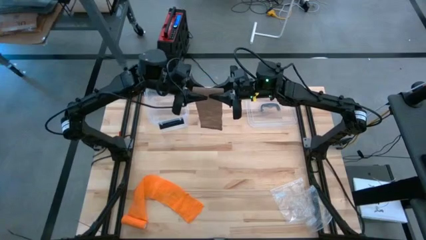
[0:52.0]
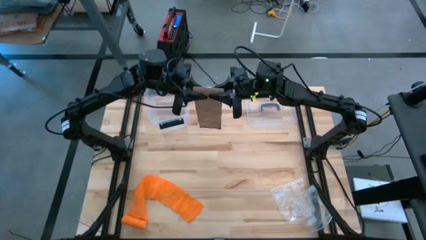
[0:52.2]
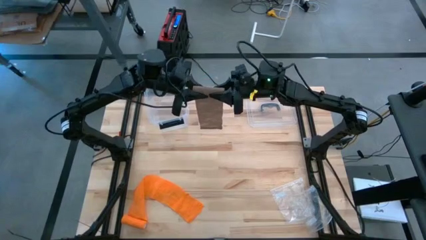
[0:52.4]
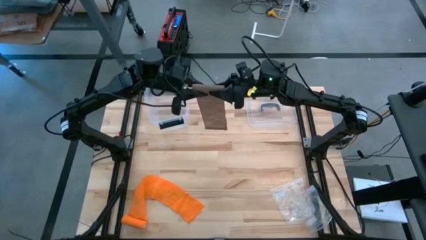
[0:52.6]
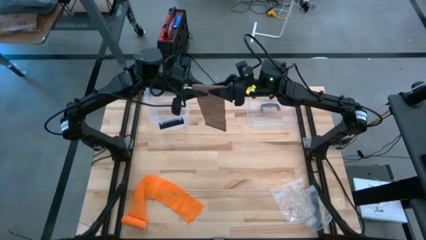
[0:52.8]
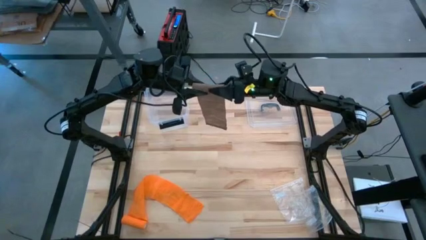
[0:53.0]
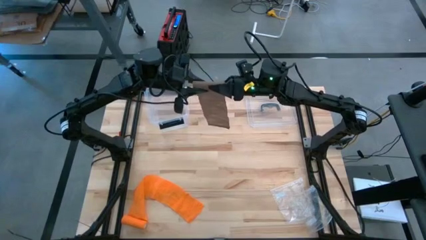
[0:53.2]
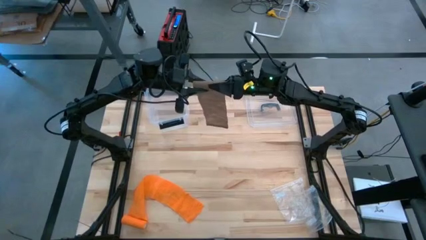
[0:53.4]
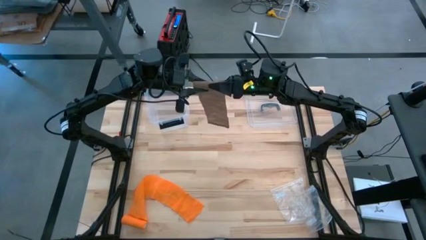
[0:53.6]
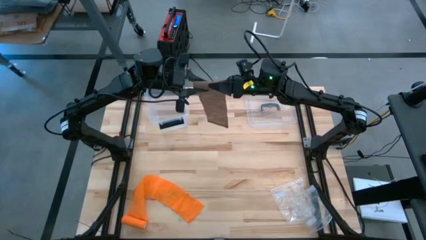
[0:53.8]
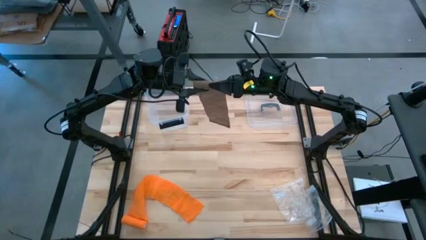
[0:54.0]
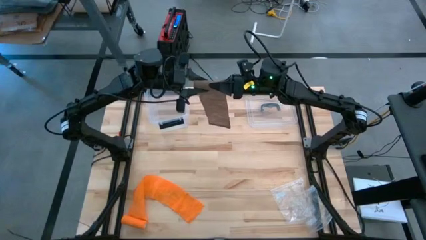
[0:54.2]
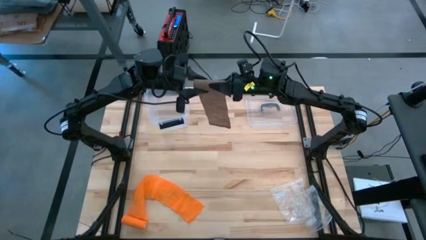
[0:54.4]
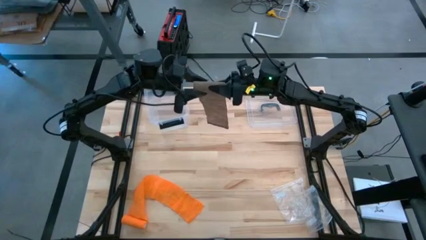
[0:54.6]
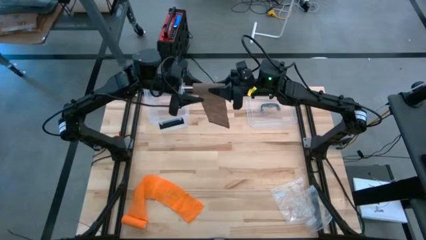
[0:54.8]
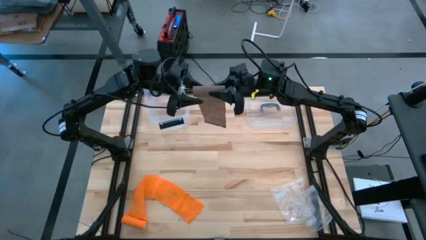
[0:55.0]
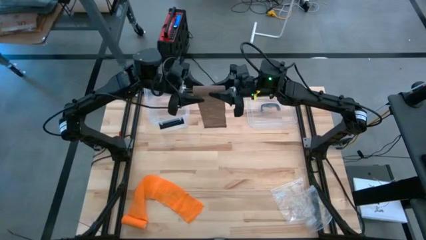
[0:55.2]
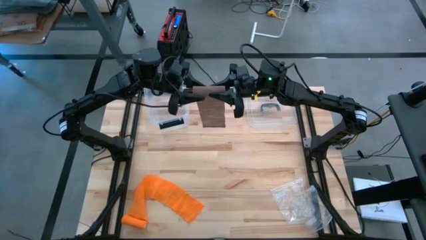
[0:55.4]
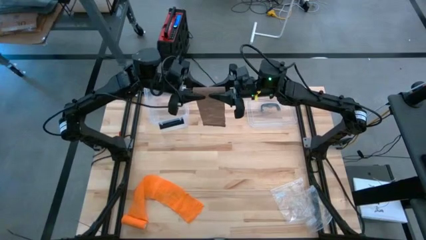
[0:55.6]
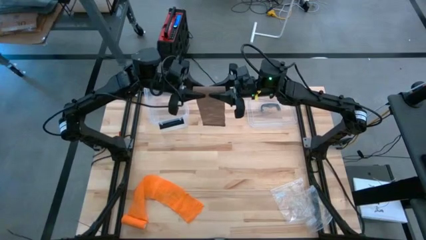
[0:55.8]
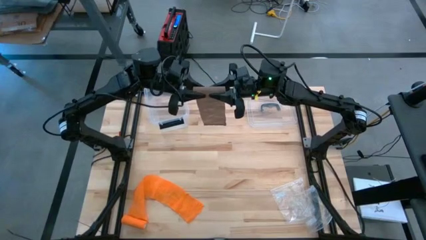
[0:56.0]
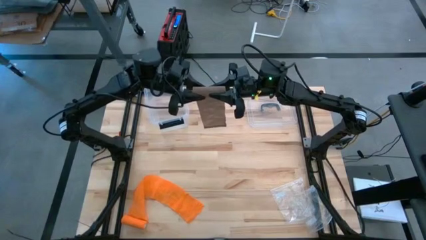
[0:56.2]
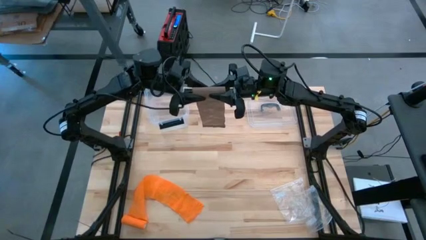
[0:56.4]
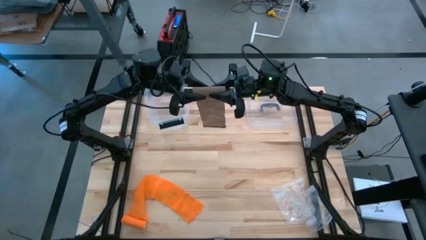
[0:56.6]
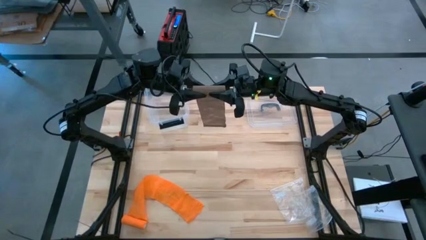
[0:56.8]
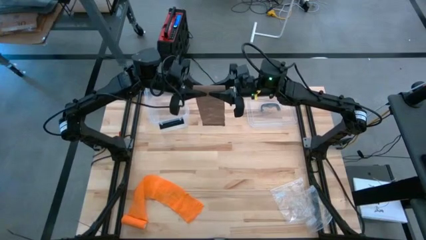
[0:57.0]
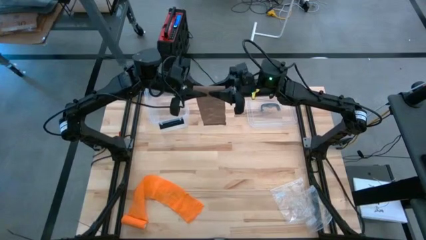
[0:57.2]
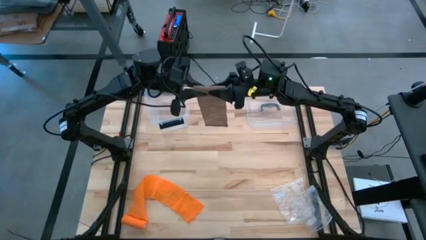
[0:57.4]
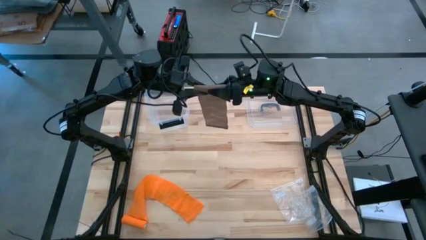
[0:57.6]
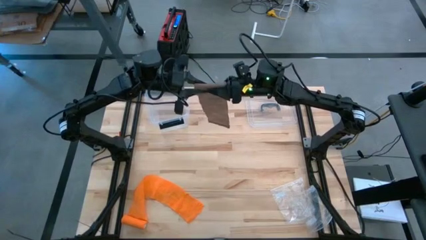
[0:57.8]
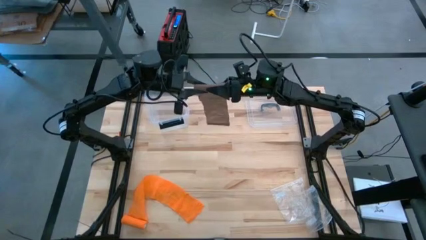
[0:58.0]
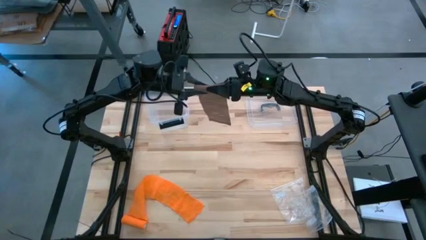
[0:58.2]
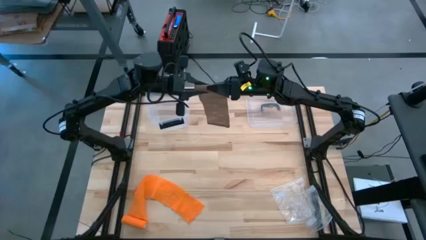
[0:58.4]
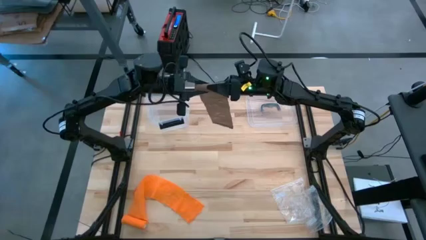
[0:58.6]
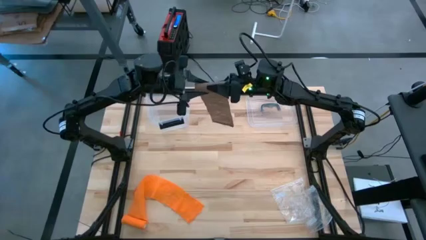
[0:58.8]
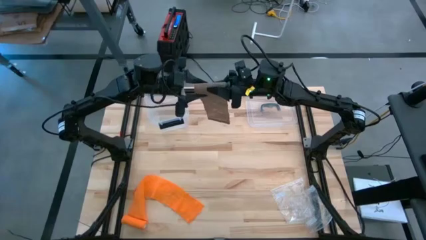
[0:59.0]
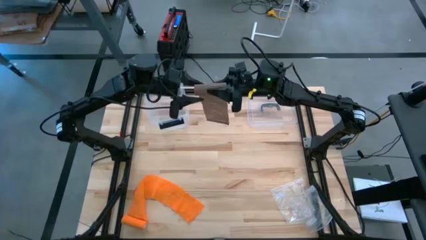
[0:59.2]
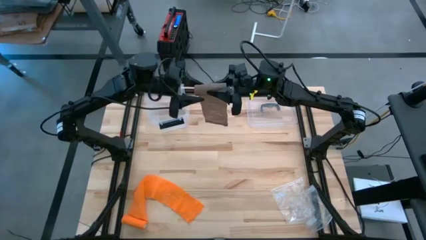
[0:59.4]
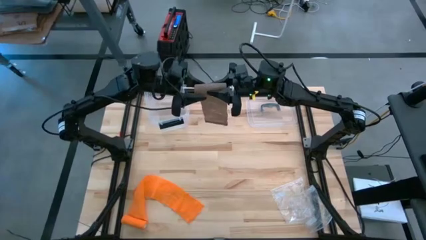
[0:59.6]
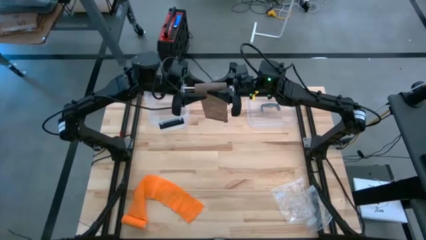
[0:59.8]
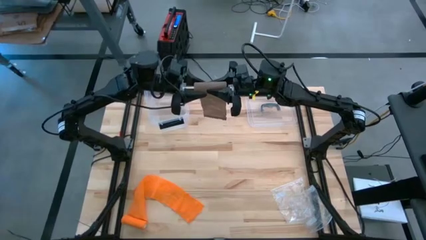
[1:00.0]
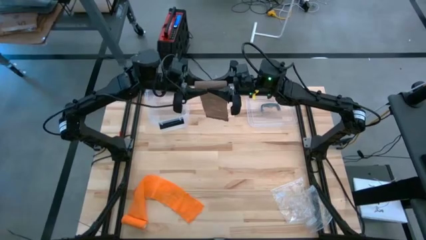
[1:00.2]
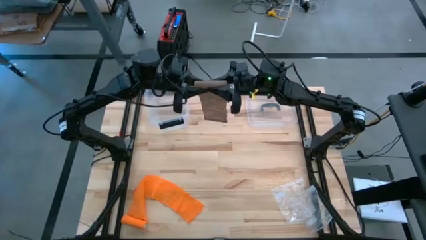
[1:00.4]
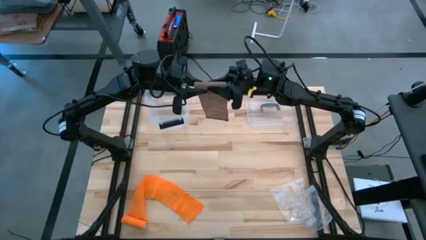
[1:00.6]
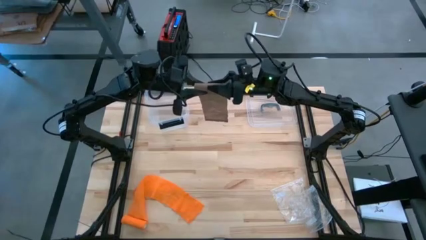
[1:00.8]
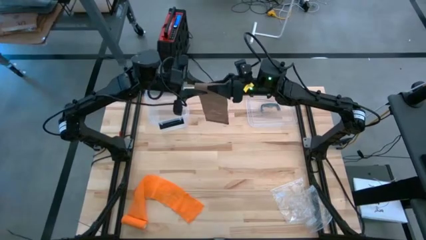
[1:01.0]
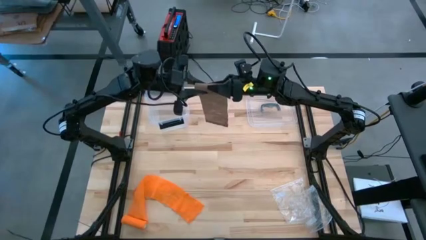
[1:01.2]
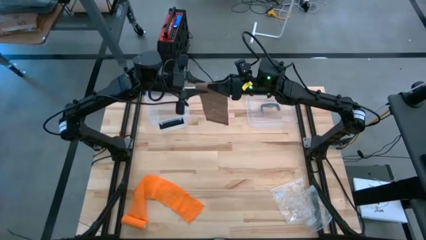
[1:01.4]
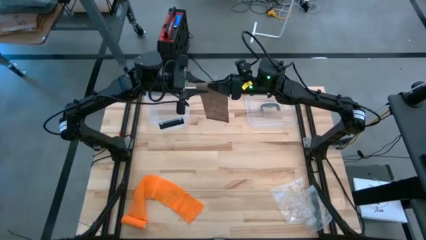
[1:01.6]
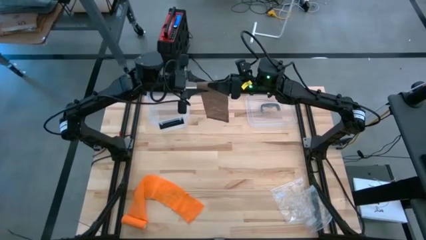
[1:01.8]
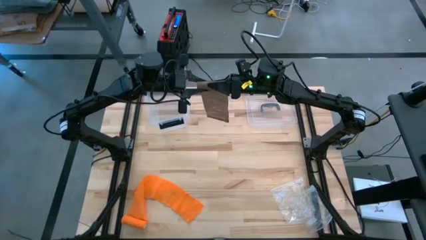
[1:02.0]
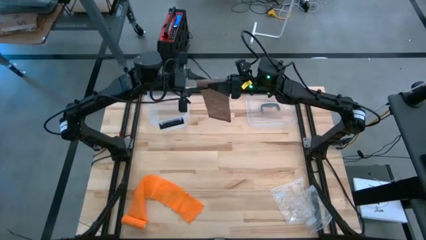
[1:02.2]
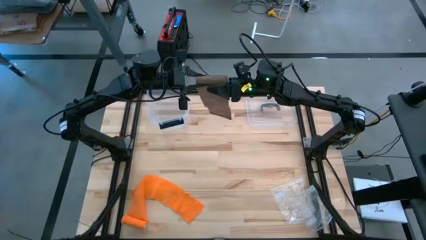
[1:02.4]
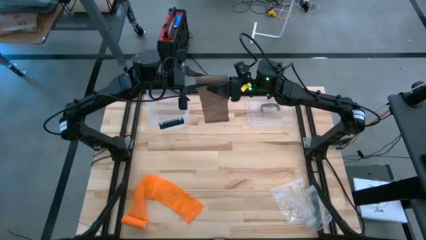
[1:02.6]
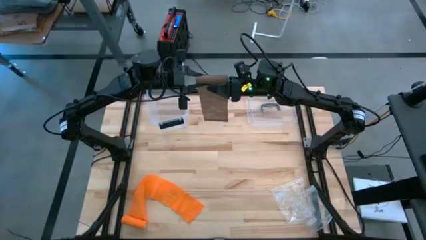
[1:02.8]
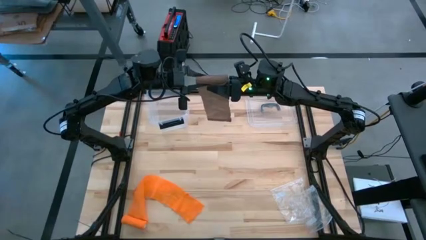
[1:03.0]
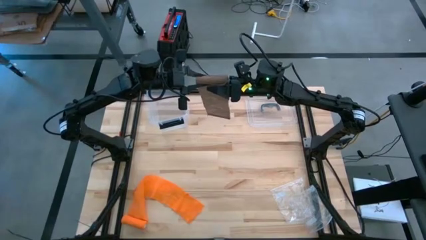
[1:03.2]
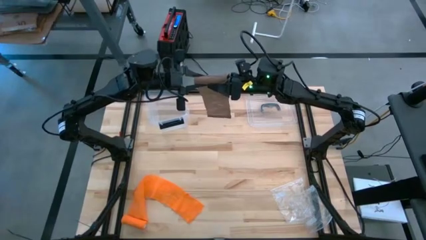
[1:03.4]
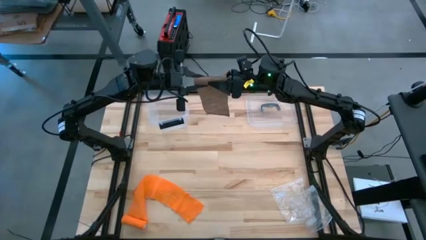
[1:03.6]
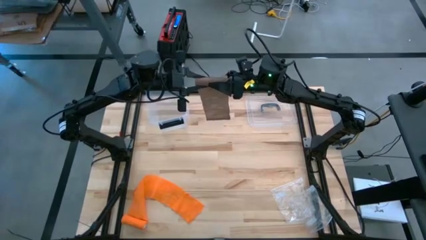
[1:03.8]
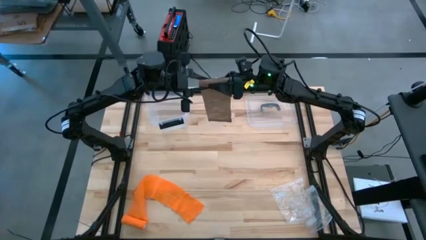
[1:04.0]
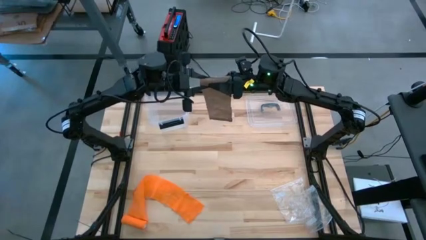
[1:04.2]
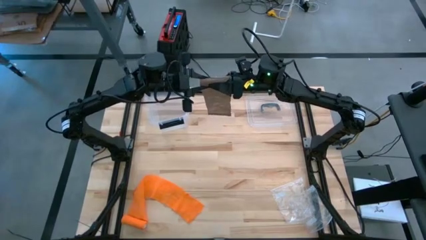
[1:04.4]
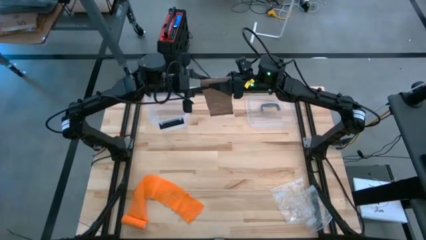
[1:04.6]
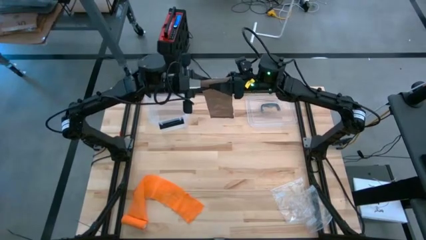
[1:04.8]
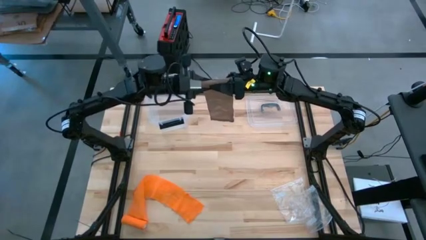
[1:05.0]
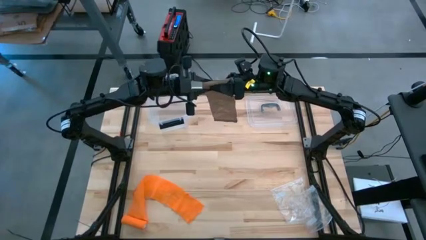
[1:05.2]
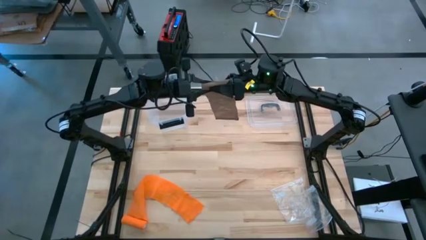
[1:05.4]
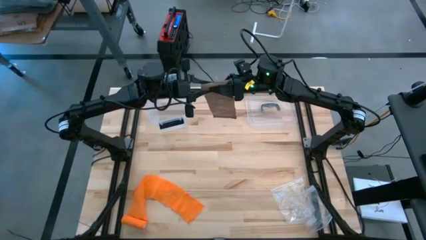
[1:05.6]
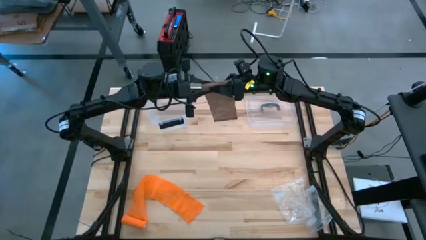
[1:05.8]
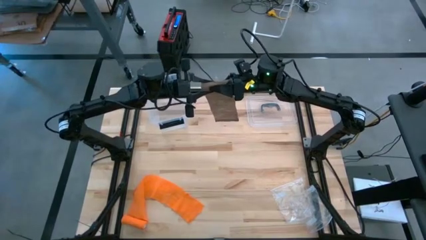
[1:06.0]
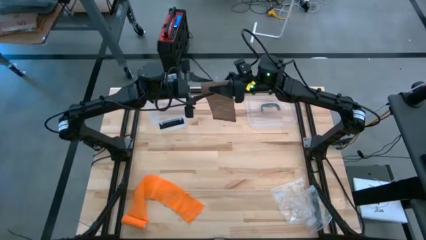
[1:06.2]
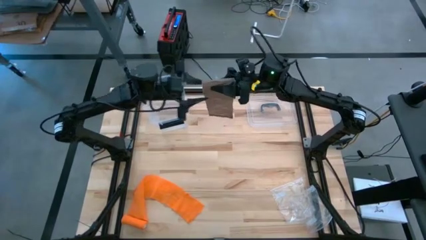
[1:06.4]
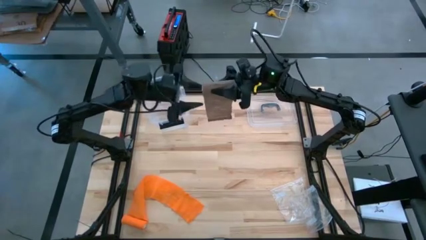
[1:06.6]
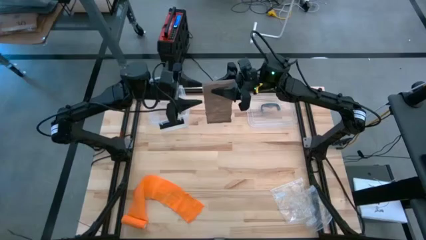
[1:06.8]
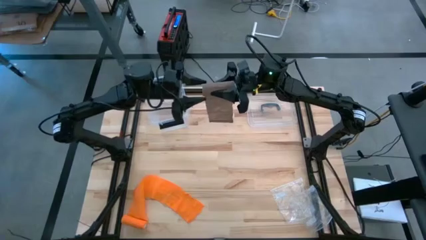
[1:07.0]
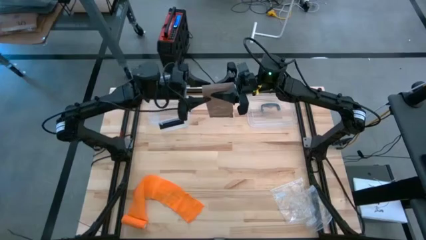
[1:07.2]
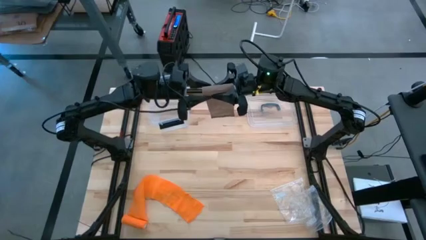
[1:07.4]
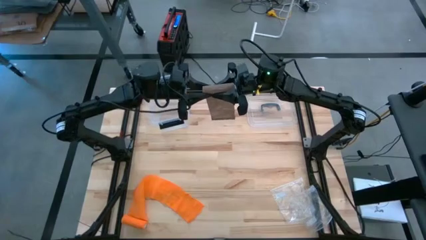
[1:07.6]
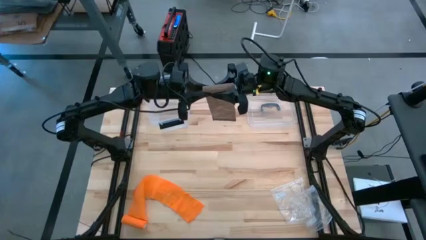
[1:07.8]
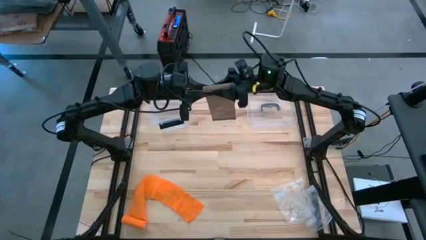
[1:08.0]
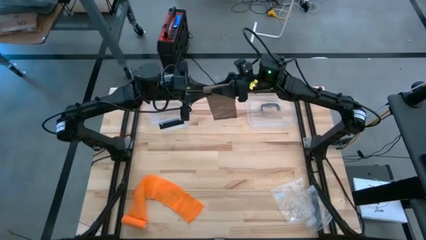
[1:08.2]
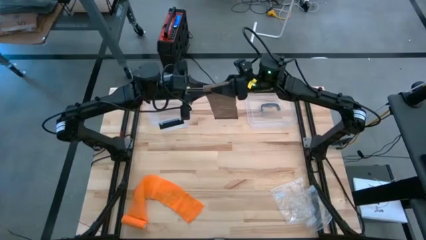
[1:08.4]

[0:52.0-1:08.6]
Task: Roll bandage
Roll the brown bandage
